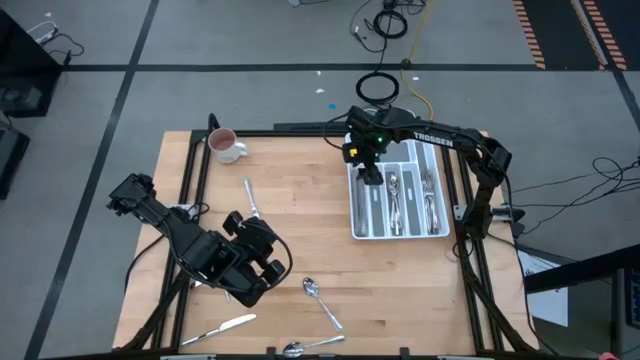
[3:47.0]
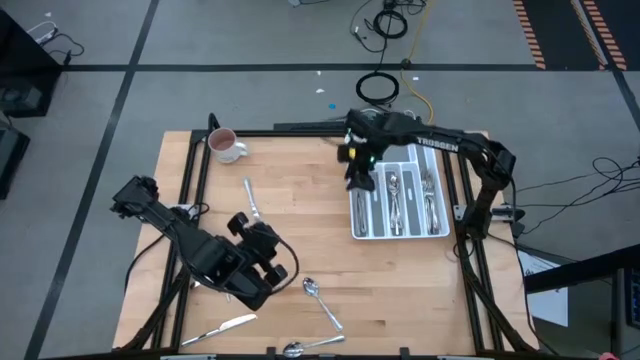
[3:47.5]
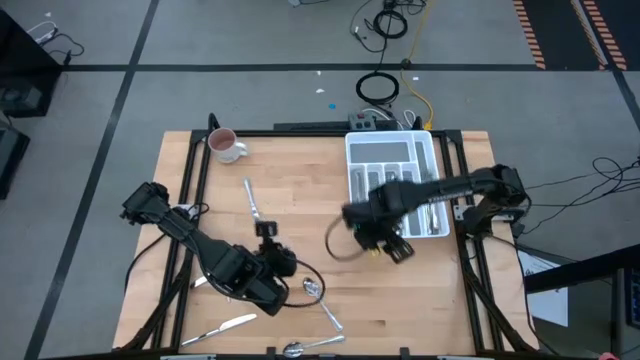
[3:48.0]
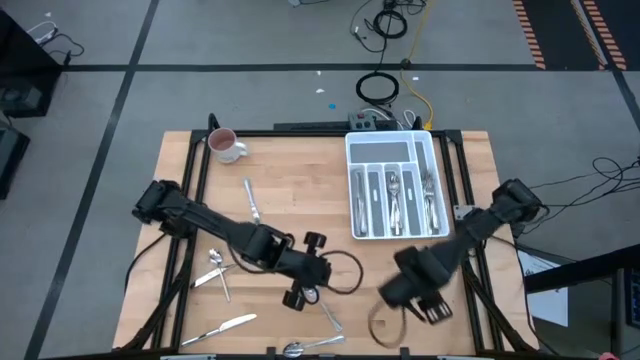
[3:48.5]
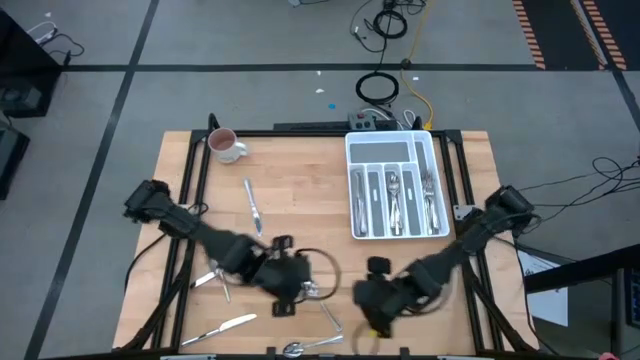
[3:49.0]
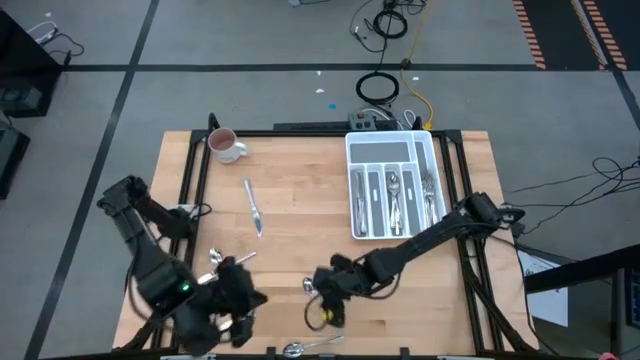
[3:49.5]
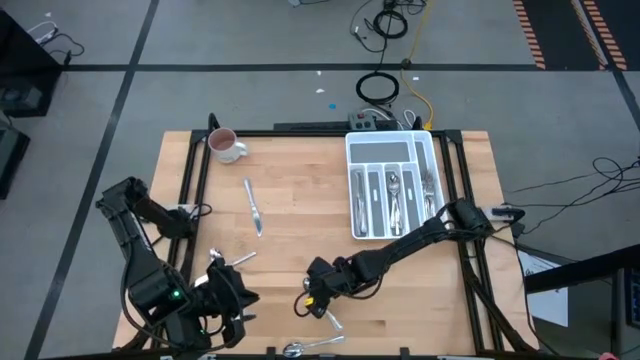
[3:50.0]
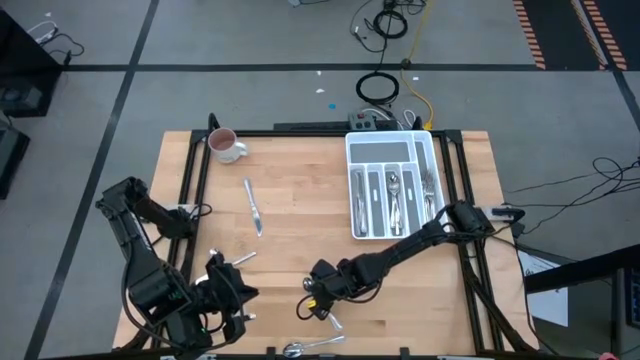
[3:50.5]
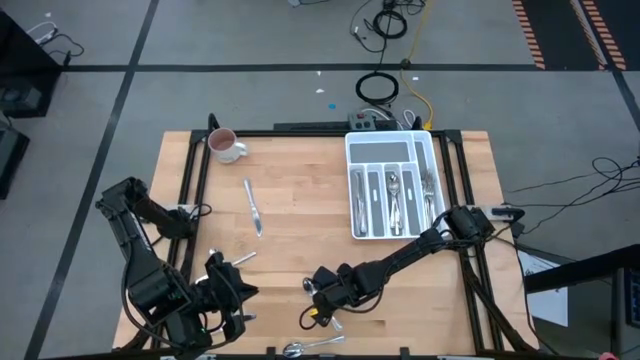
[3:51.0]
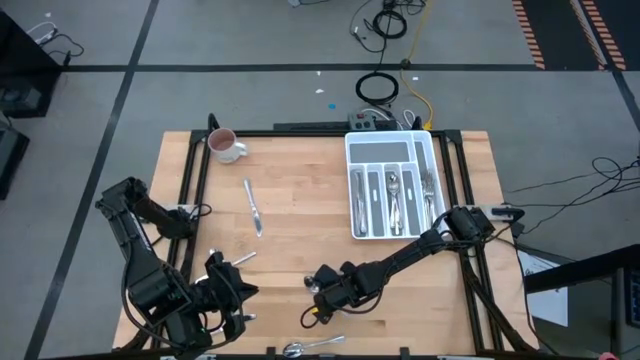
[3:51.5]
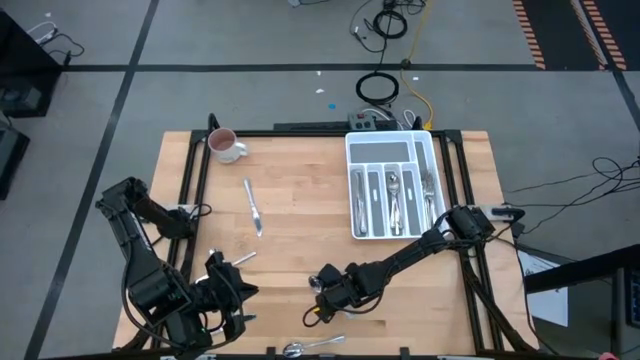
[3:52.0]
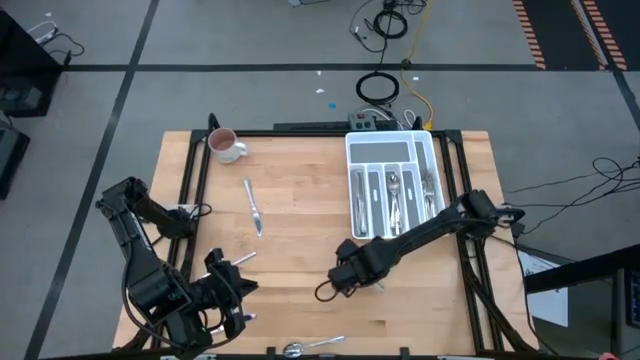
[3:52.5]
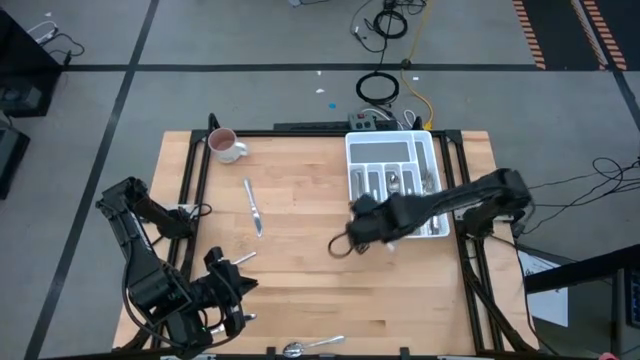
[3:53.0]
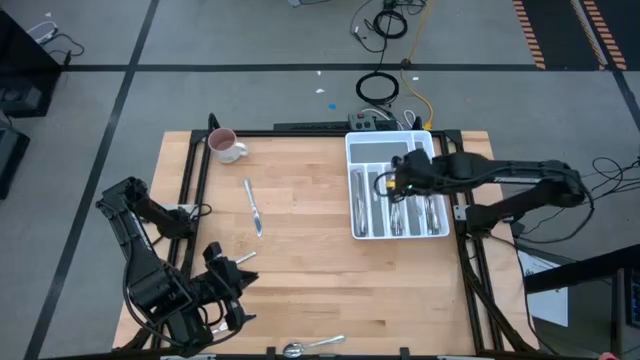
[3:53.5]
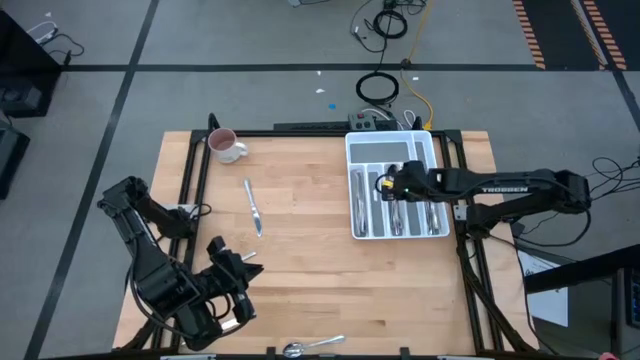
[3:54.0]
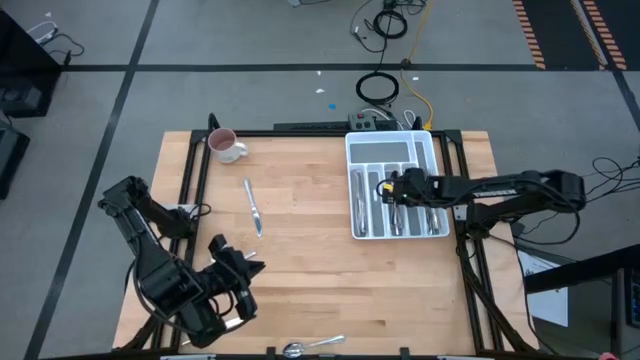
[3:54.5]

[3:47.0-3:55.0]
Task: Sort silverware
Put the top right spoon in the middle section of the silverware tray

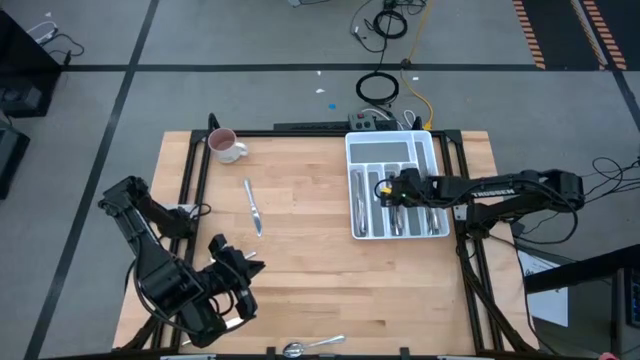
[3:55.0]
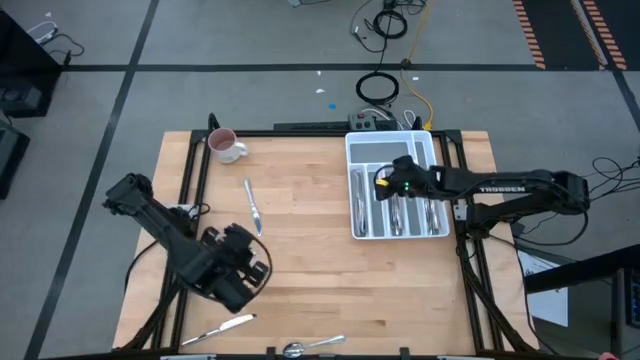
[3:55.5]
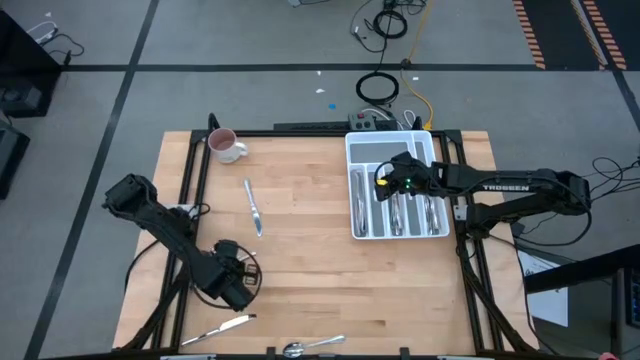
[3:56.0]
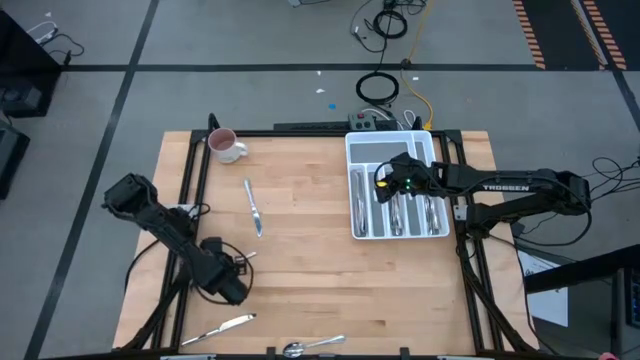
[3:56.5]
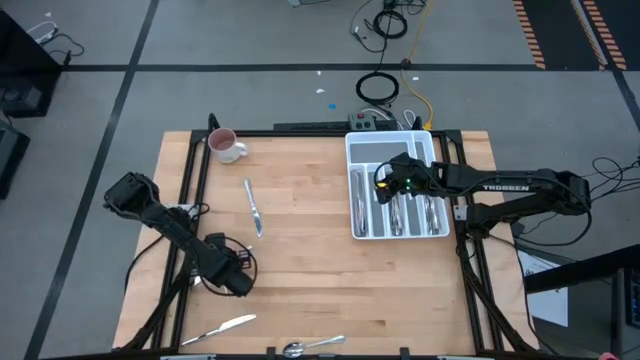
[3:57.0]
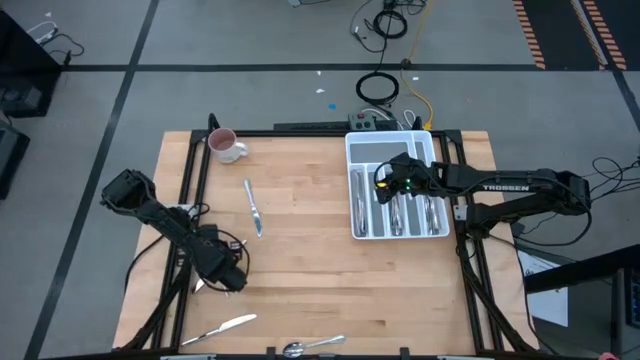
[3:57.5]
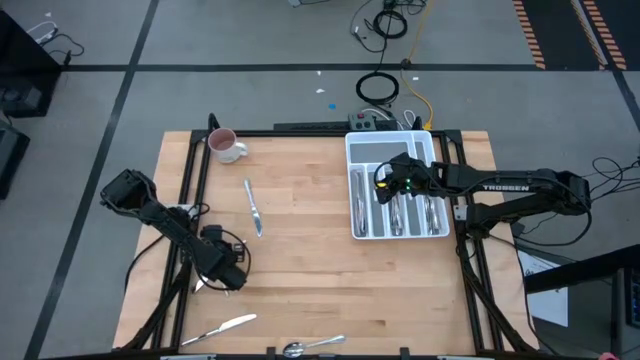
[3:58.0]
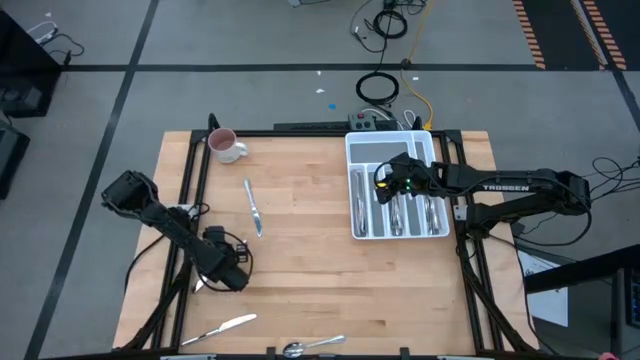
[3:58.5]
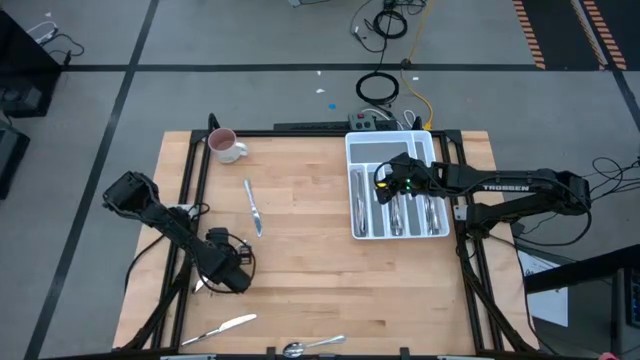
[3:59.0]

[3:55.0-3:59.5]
Put the top spoon in the middle section of the silverware tray

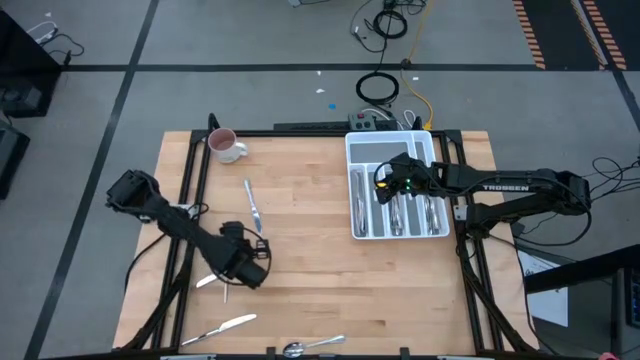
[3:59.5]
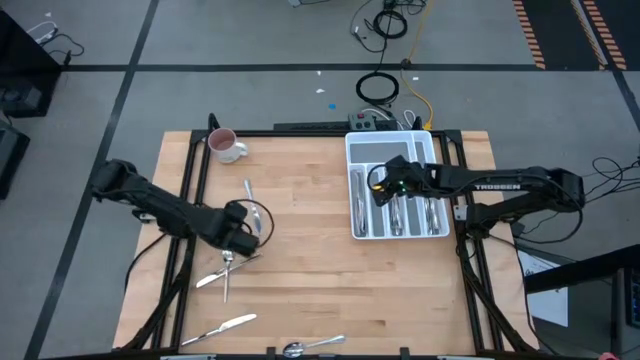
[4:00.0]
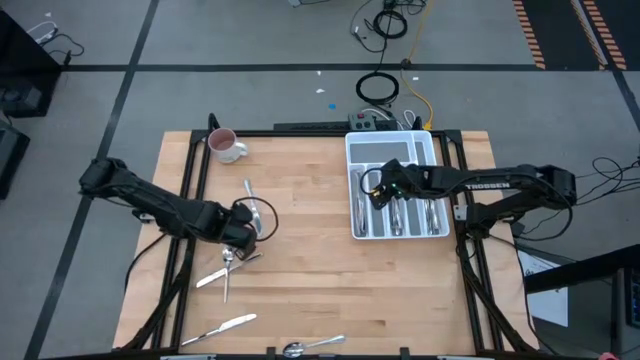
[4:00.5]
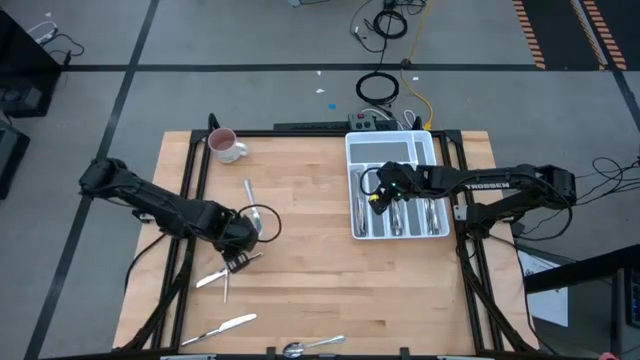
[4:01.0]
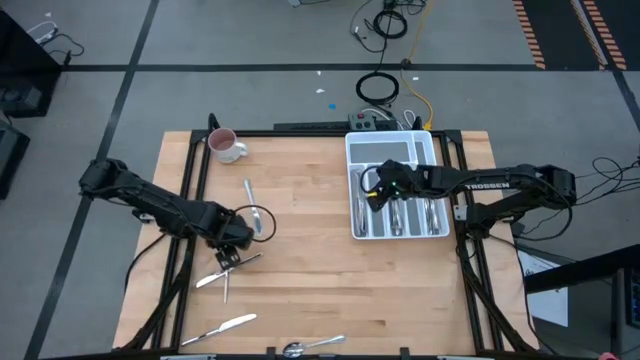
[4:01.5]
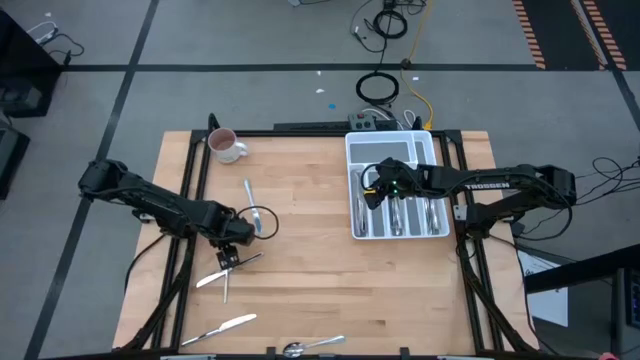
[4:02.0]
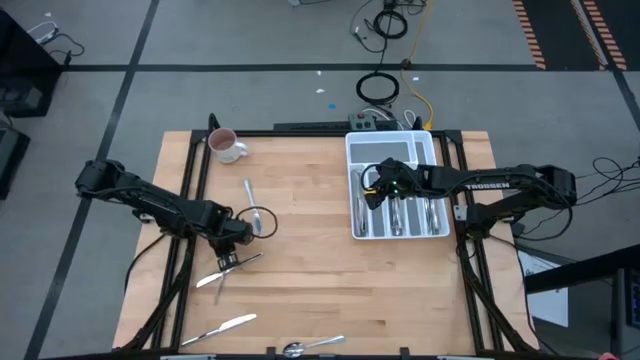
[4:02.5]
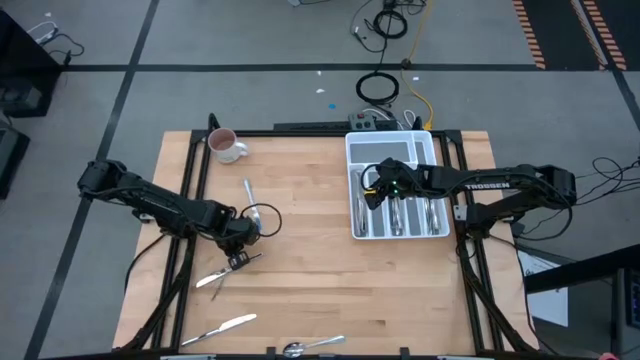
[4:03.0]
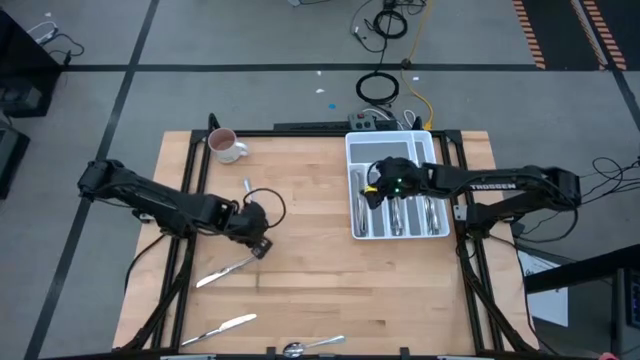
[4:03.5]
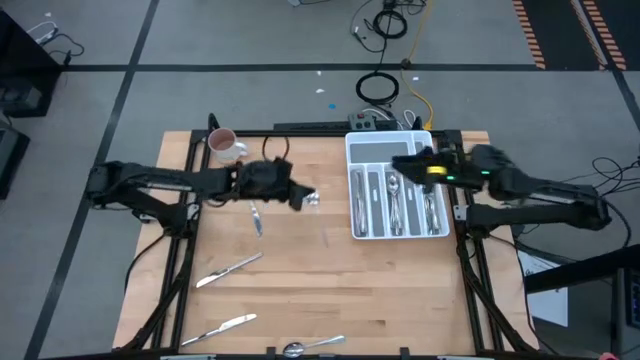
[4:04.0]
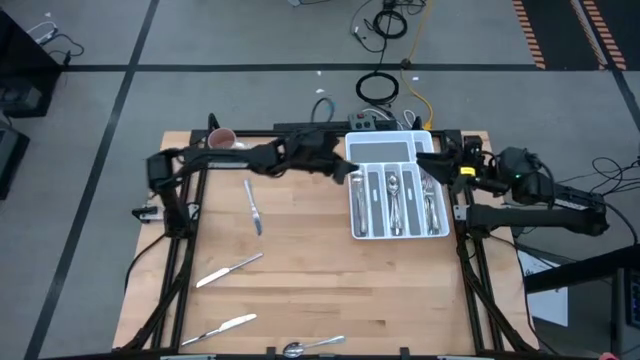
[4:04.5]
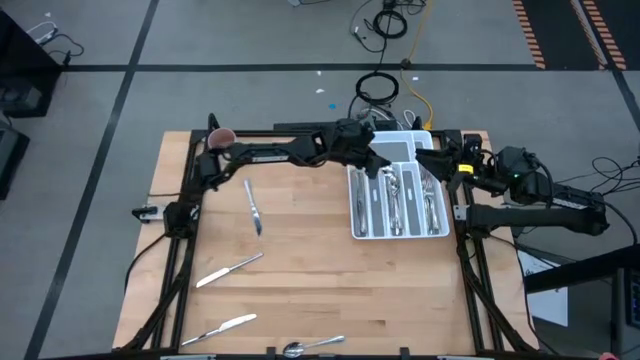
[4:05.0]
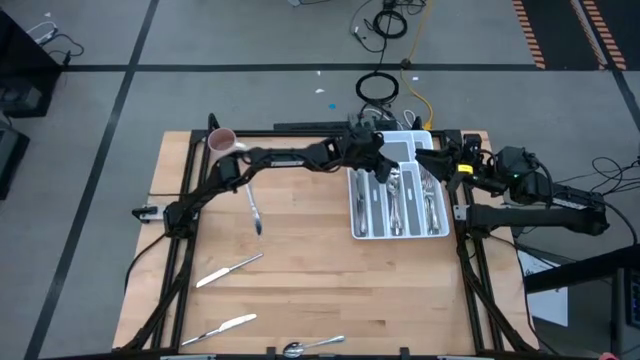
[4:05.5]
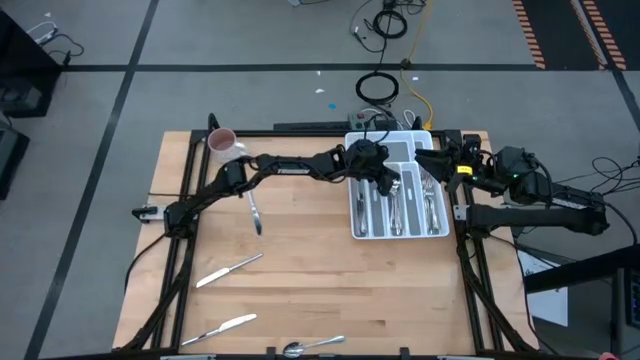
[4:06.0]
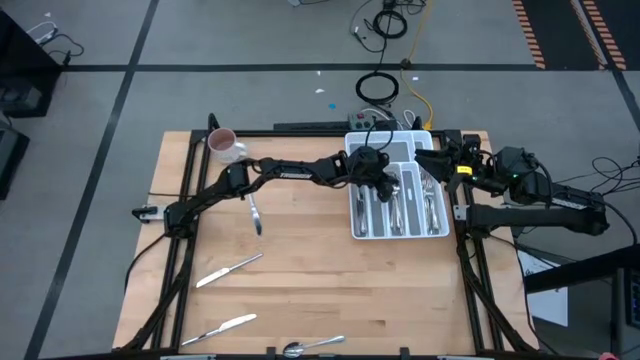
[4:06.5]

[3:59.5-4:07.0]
Put the top spoon in the middle section of the silverware tray
